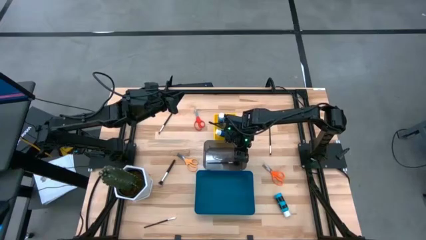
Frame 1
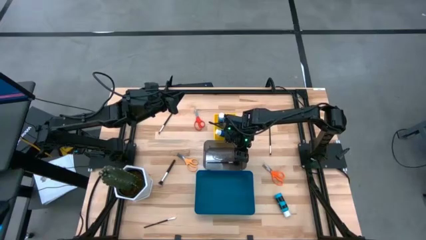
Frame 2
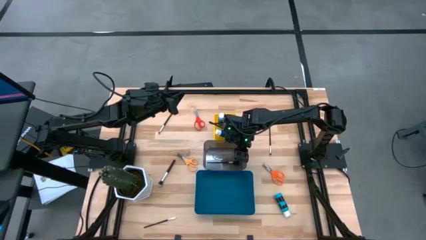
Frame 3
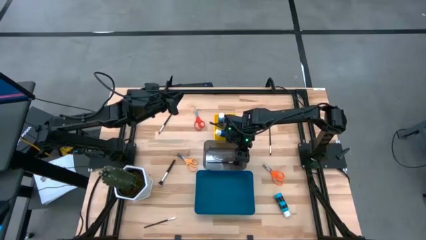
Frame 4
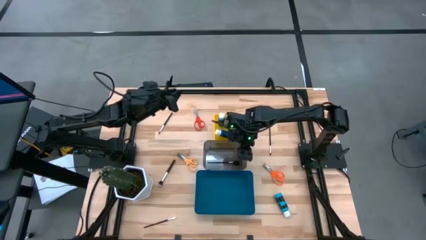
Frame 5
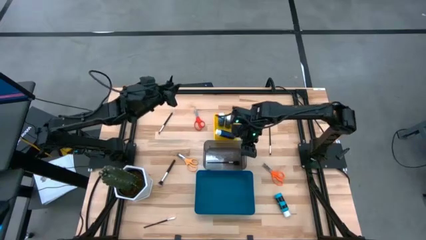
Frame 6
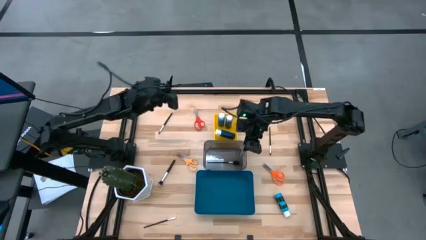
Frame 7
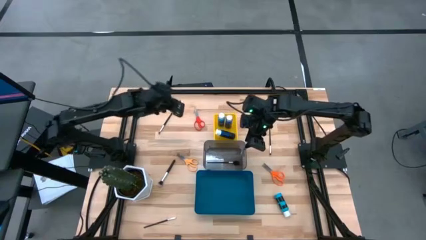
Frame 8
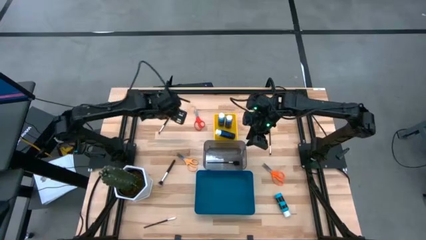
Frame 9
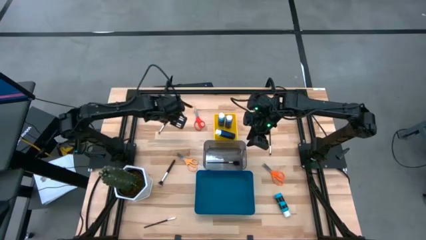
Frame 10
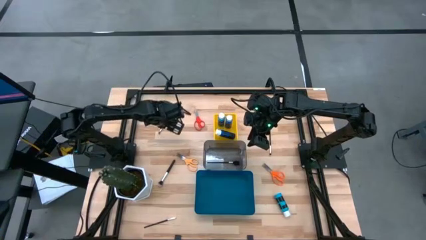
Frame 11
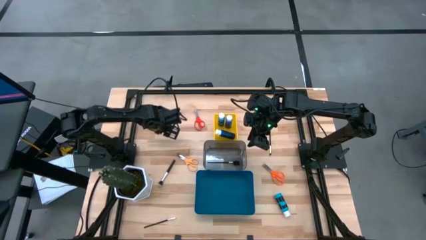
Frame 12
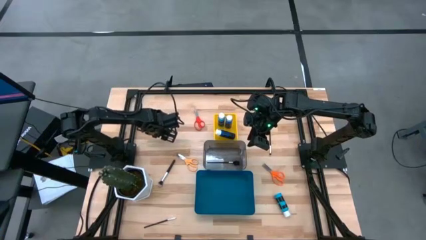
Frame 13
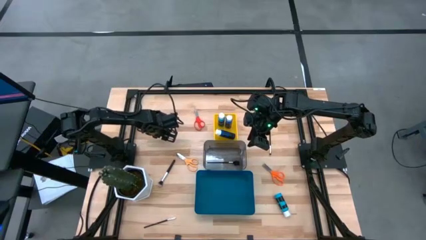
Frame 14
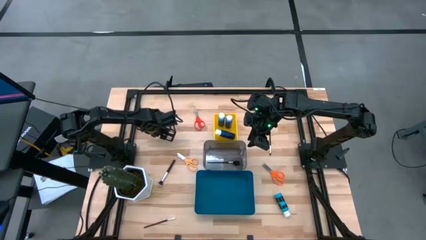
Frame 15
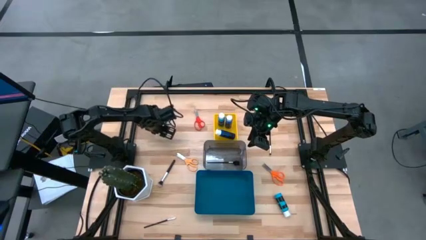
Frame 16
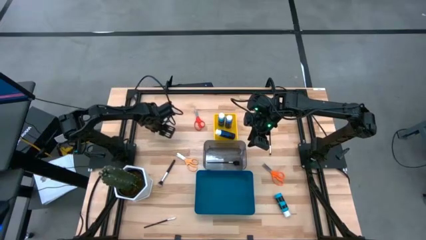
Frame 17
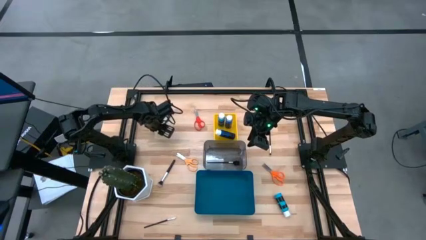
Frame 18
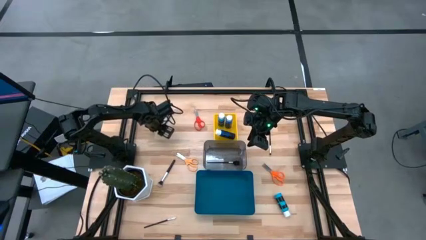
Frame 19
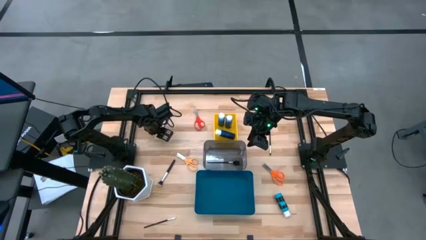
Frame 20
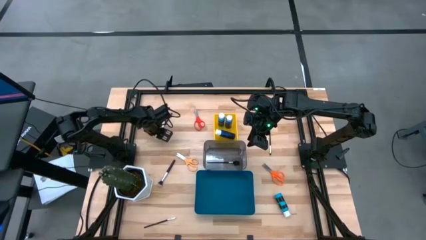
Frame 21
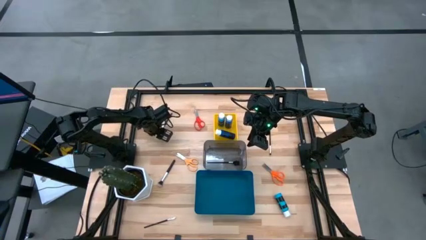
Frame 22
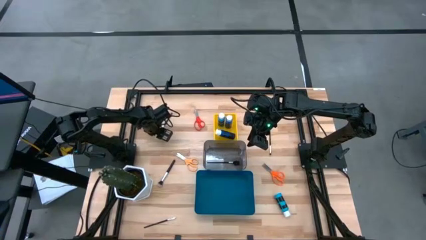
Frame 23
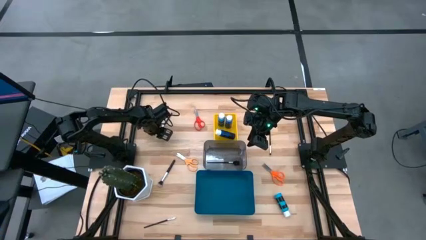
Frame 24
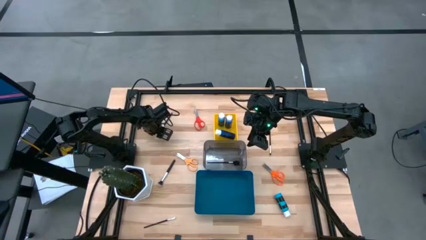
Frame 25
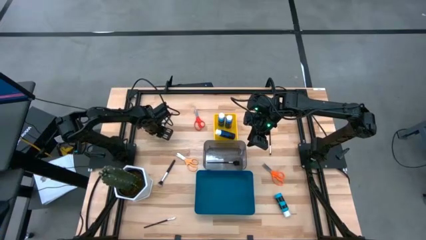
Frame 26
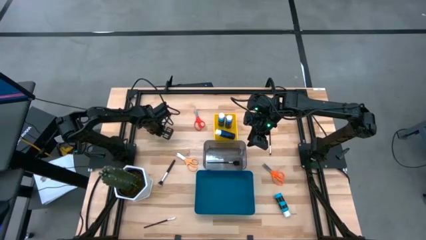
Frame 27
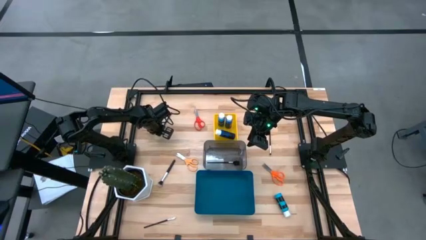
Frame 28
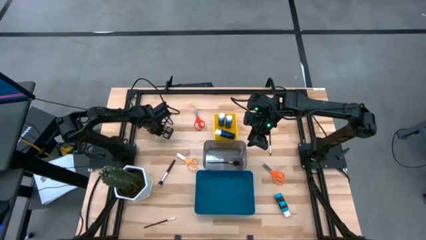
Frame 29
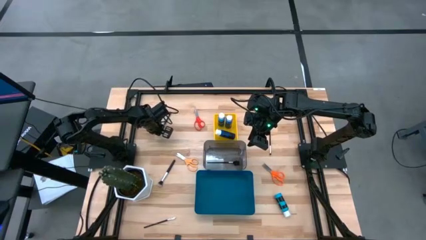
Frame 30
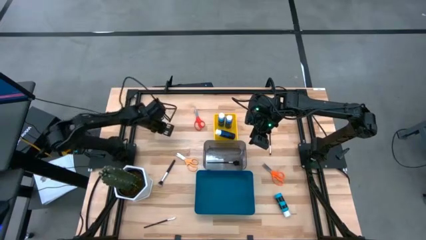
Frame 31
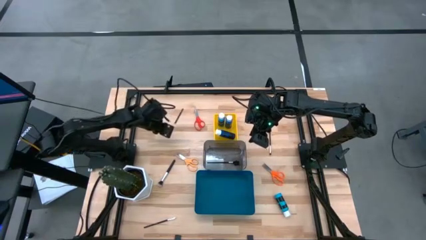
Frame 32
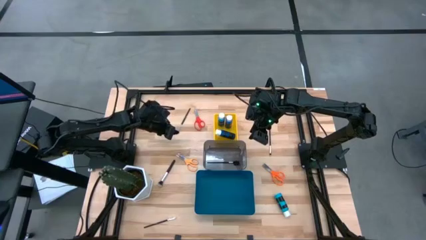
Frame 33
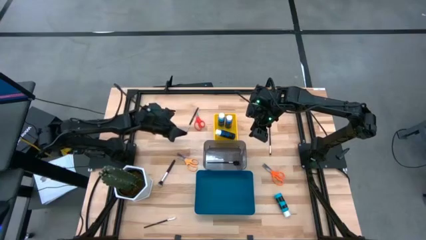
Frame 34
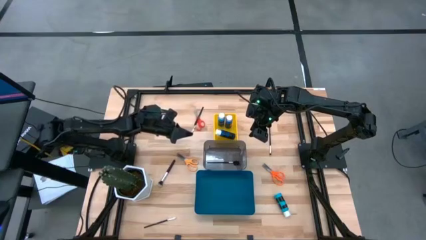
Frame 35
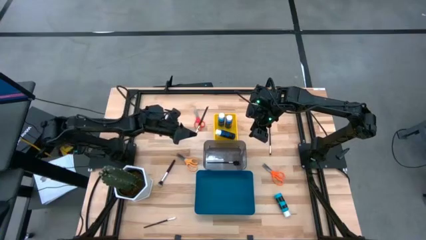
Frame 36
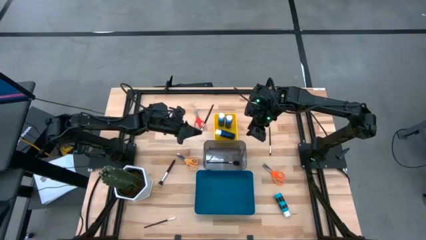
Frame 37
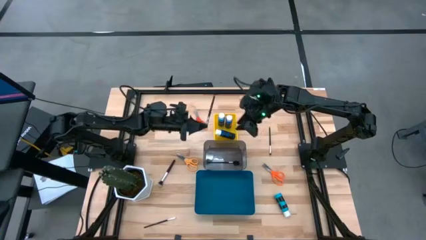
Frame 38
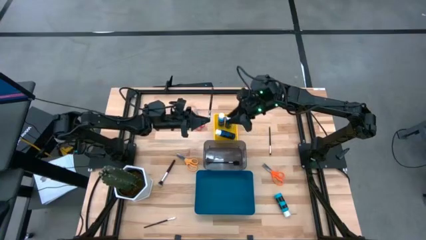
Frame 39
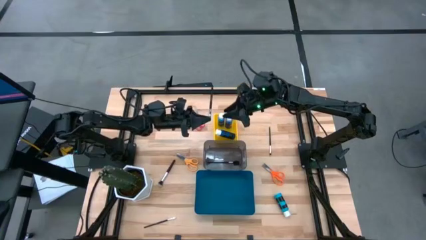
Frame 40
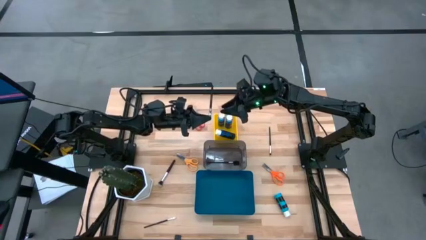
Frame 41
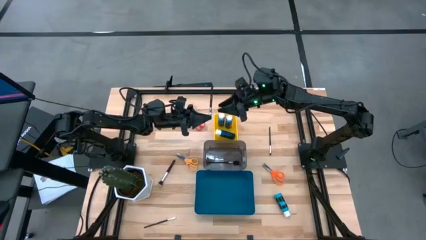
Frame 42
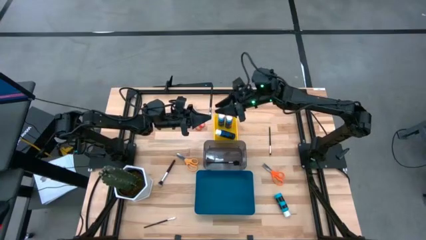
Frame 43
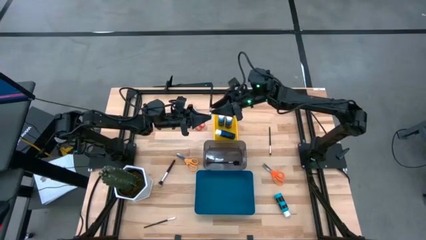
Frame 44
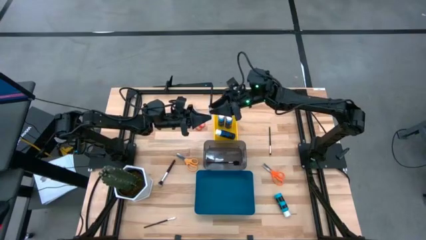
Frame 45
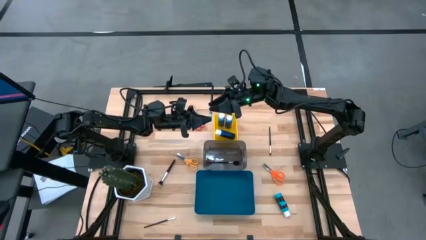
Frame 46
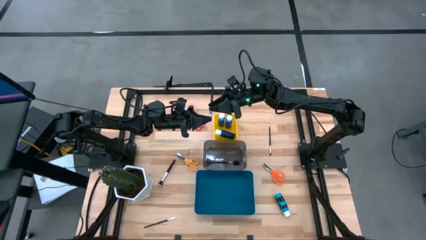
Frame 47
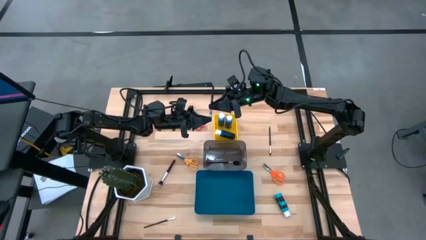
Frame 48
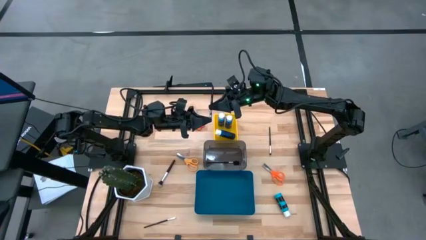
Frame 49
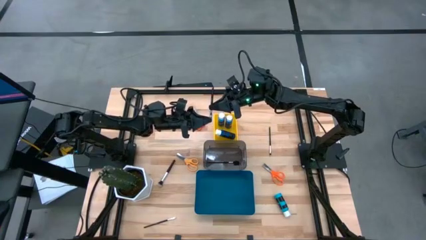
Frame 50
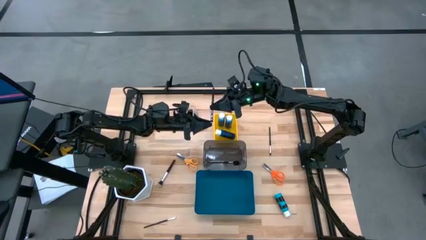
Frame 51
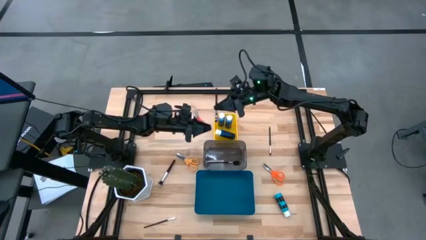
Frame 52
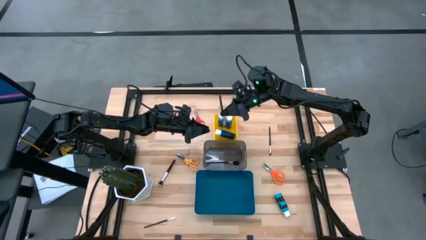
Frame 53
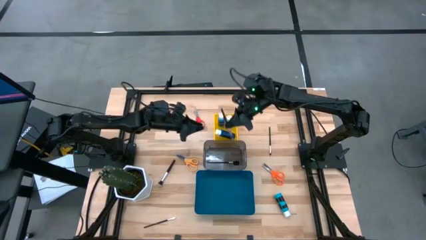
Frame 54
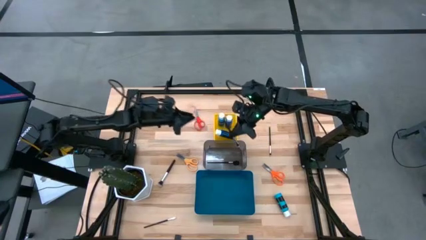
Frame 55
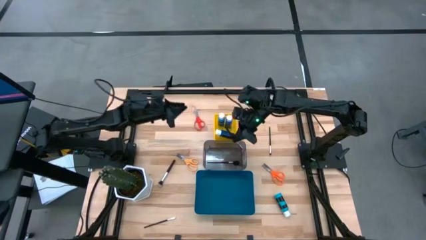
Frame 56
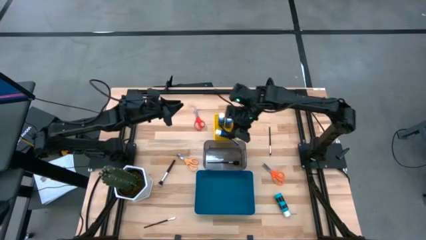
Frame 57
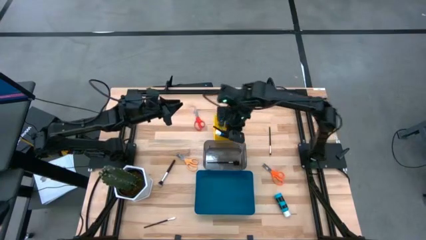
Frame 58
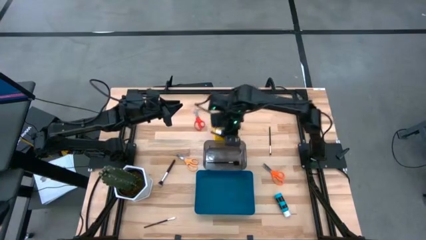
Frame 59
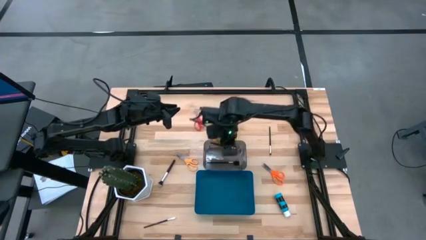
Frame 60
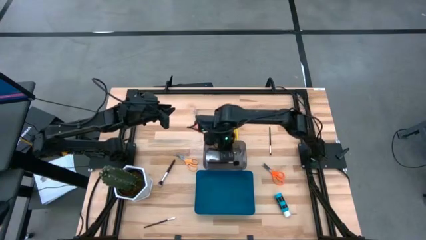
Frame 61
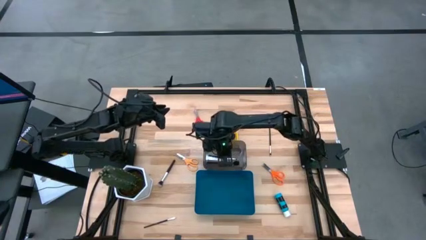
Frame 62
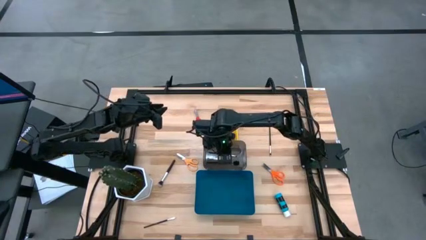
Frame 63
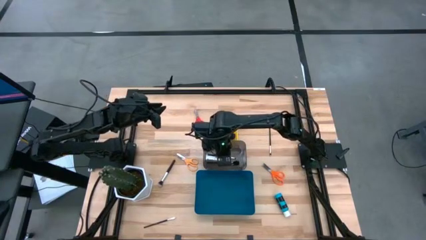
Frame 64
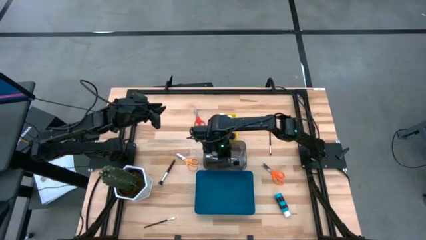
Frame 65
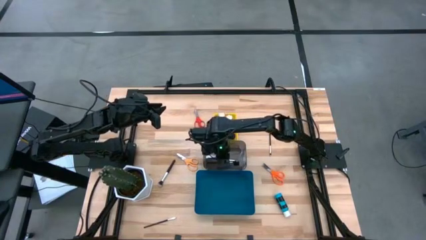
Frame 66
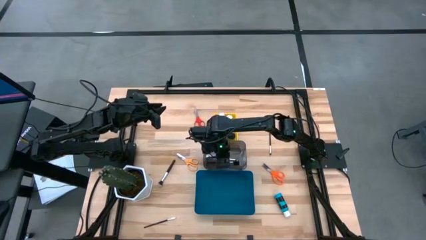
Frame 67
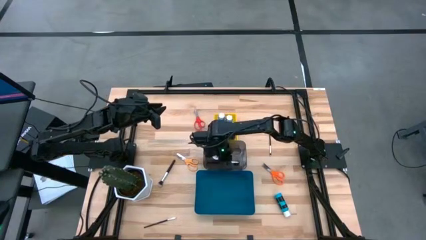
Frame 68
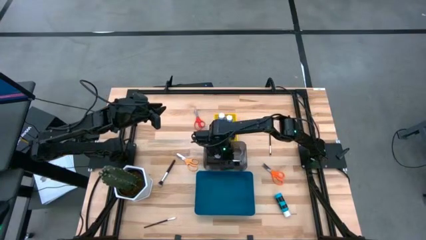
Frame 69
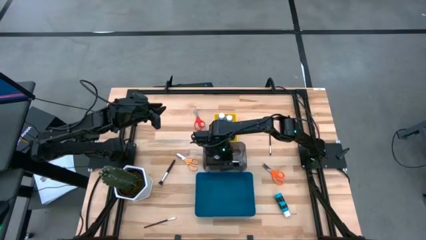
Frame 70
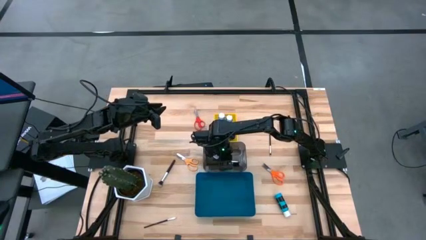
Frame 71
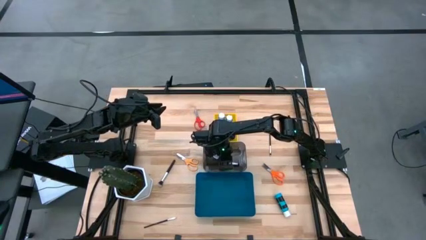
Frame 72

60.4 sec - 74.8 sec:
Task: Pick & Place Paint Supplies
Put the makeup brush into the black bin
